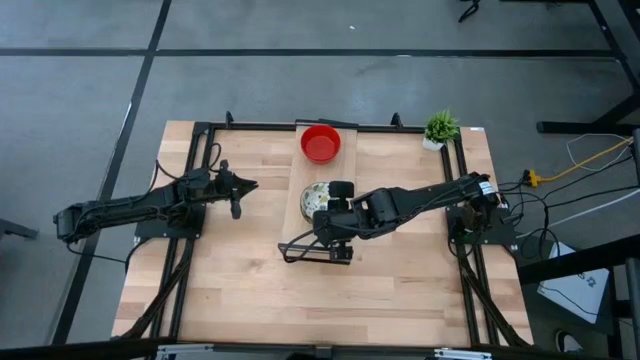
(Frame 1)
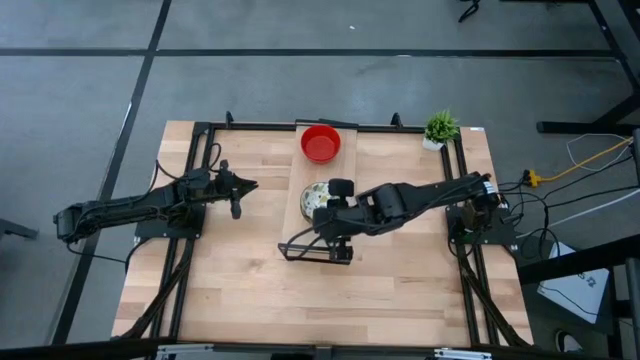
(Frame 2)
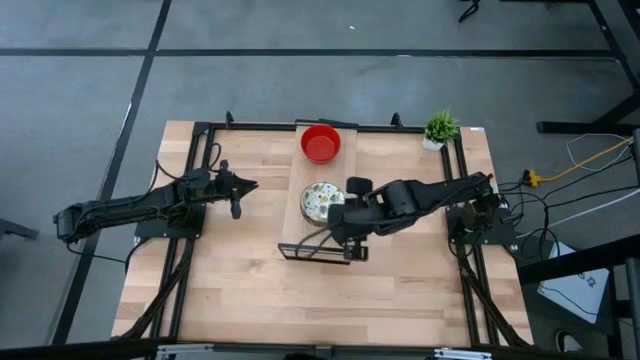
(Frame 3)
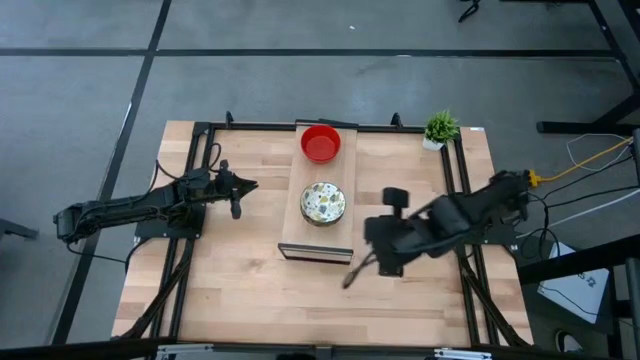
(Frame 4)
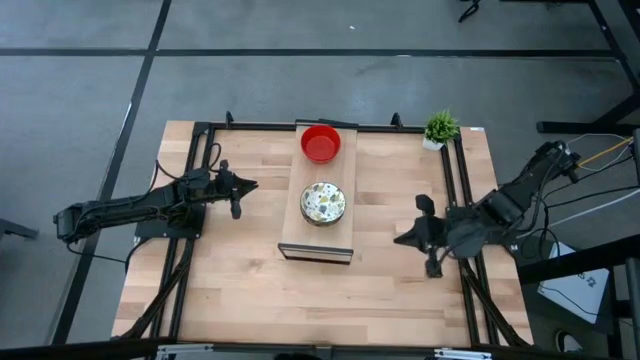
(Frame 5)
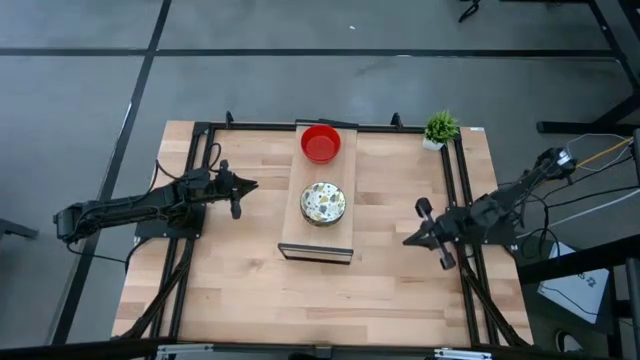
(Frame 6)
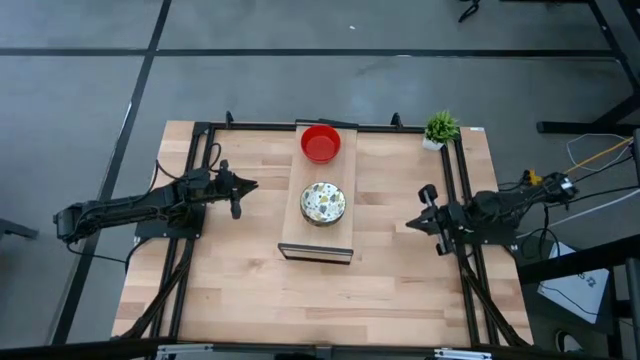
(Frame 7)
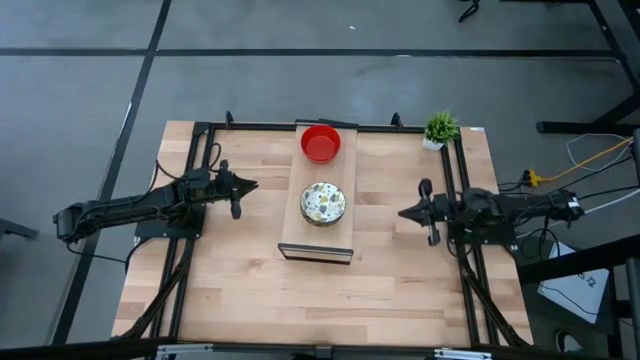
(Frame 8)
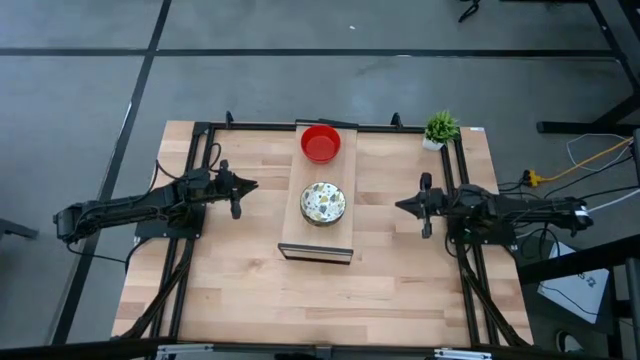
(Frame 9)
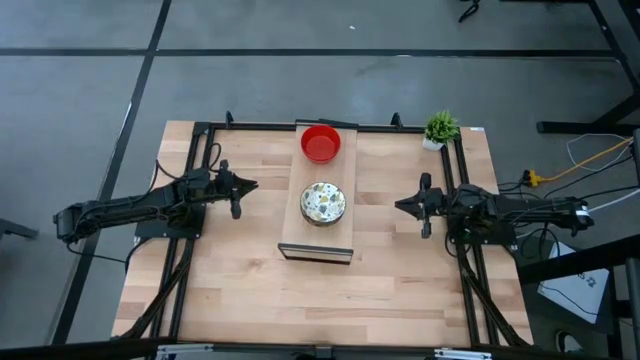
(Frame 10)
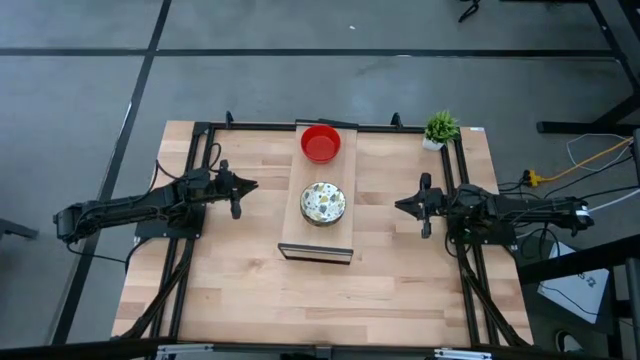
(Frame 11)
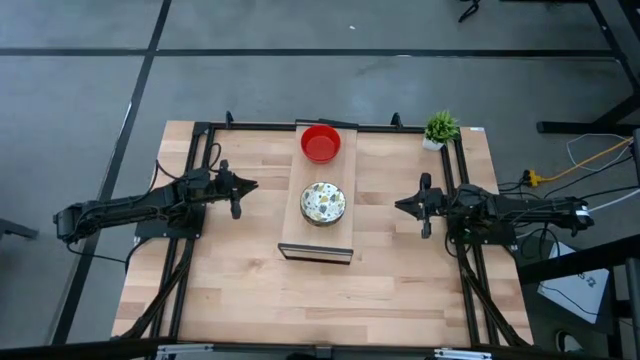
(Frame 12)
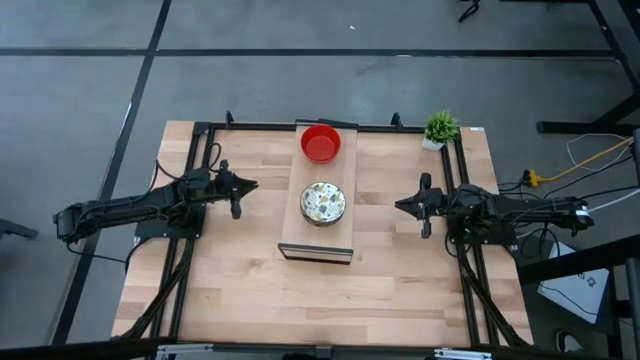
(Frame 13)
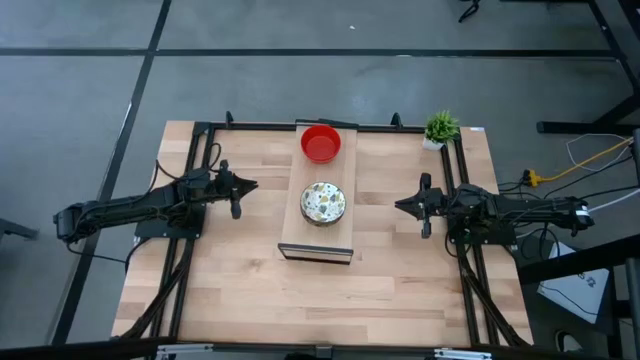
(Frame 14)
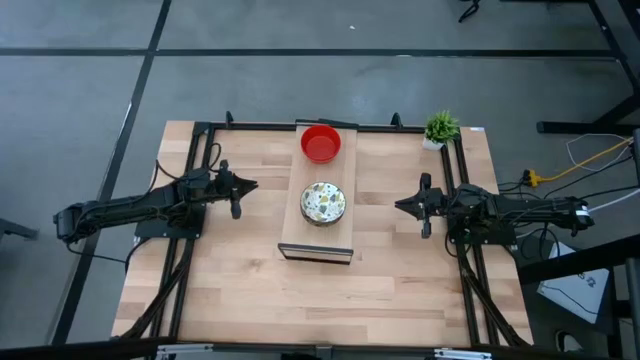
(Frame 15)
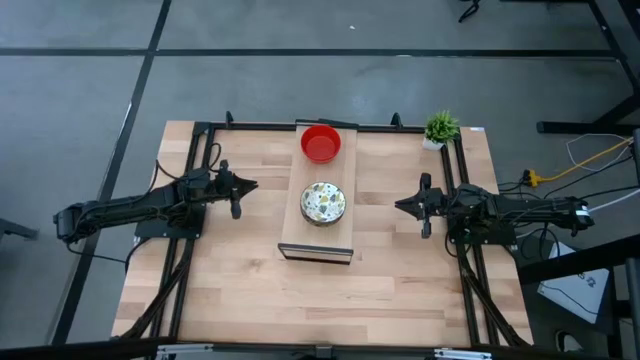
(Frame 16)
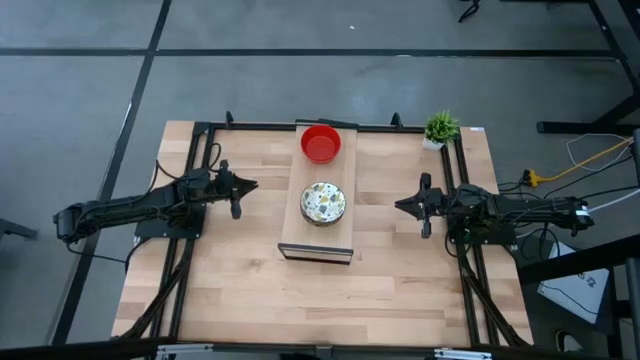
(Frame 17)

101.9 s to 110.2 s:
Task: Pick & Place Mini bowls
Return to Home Position

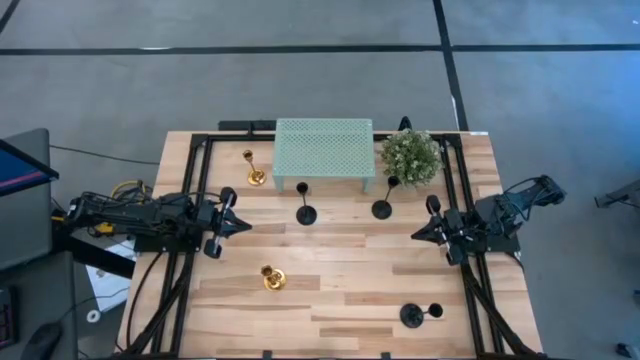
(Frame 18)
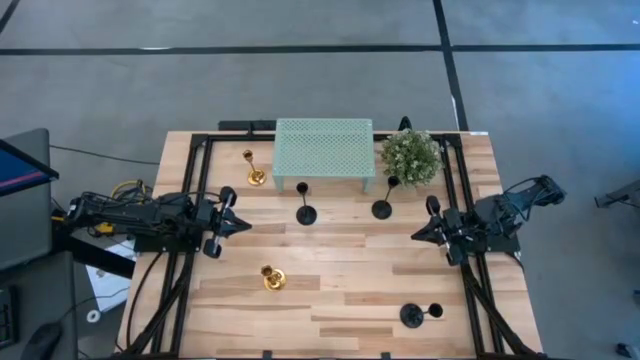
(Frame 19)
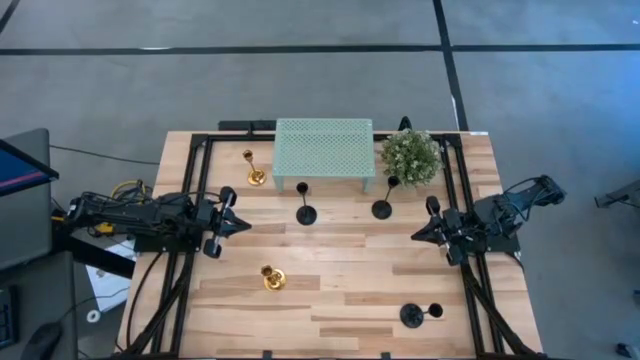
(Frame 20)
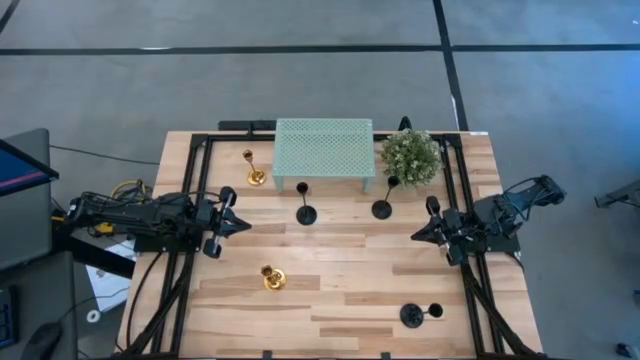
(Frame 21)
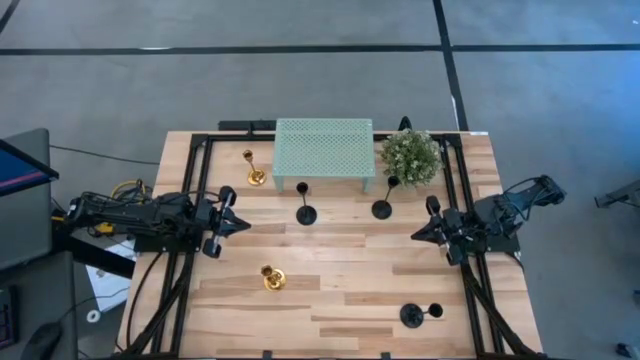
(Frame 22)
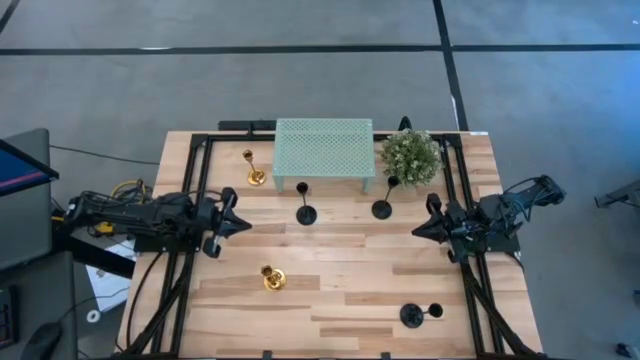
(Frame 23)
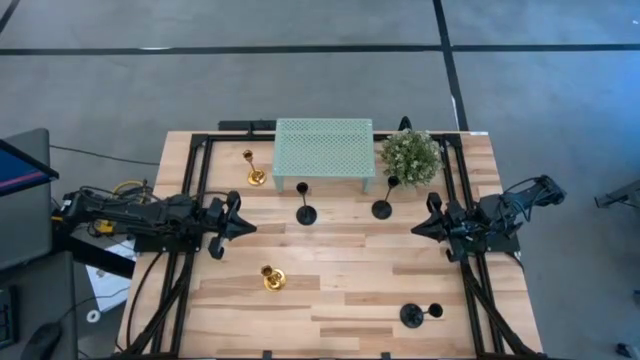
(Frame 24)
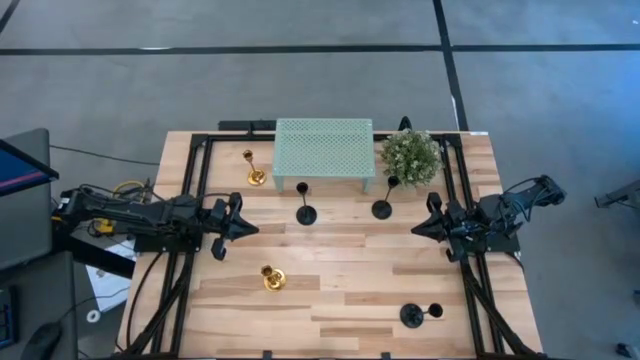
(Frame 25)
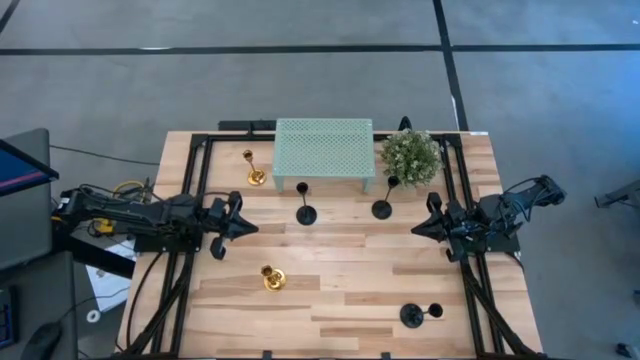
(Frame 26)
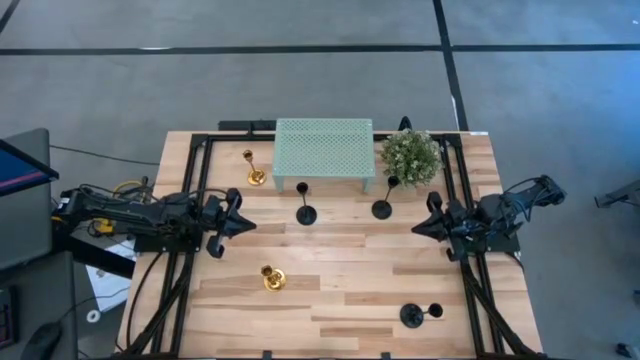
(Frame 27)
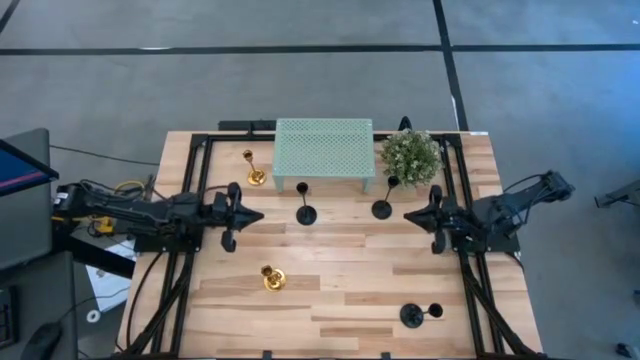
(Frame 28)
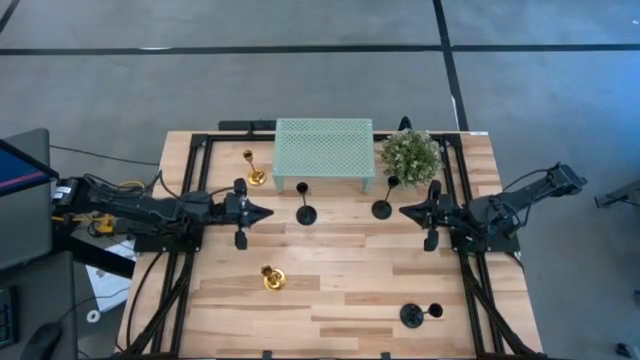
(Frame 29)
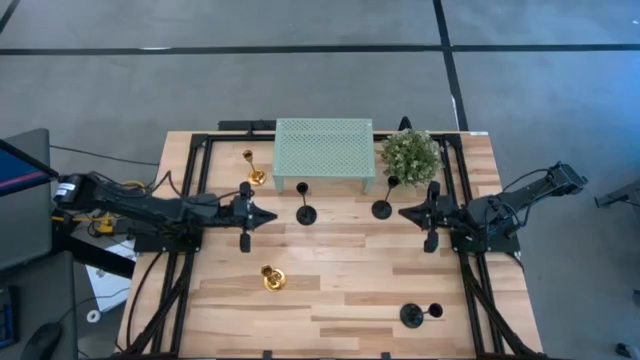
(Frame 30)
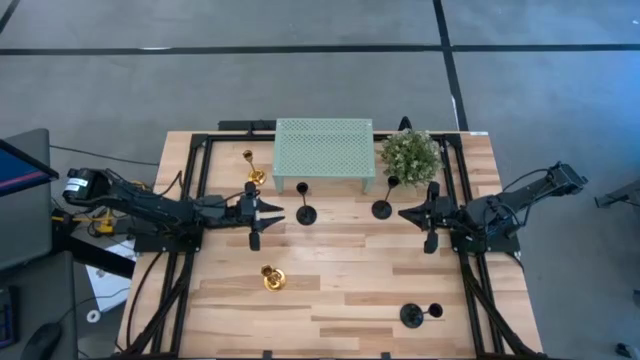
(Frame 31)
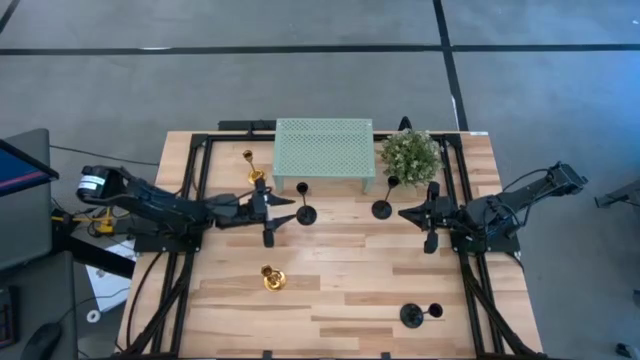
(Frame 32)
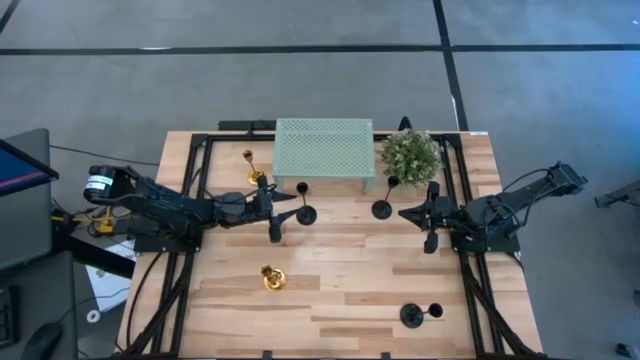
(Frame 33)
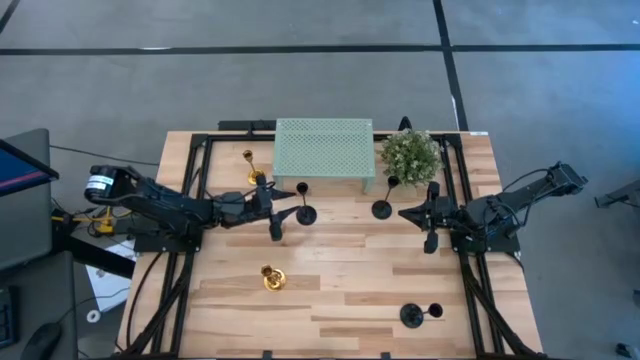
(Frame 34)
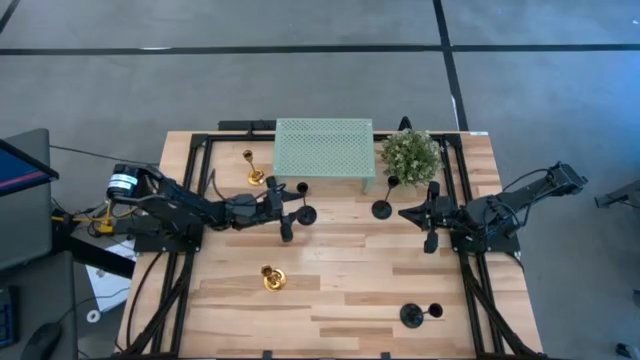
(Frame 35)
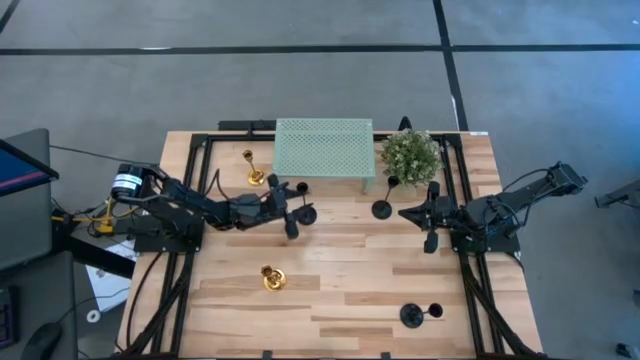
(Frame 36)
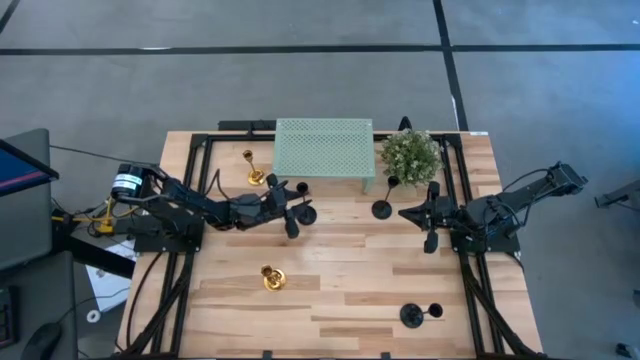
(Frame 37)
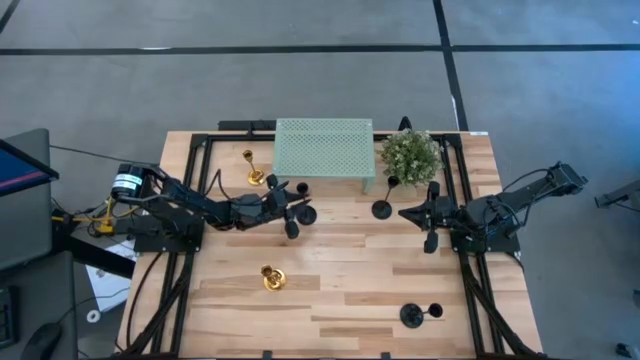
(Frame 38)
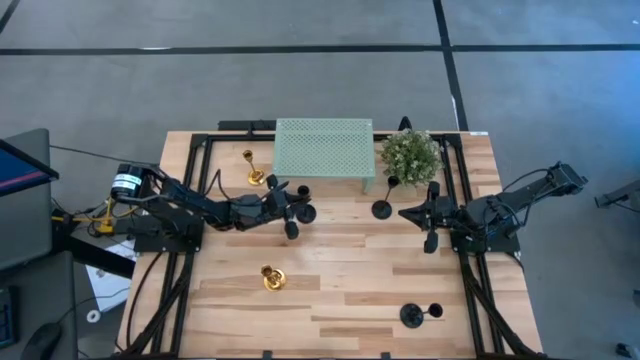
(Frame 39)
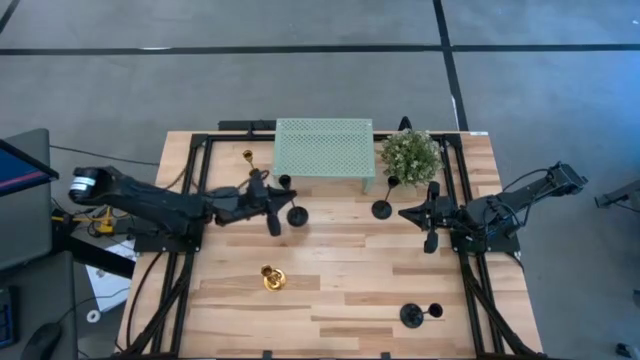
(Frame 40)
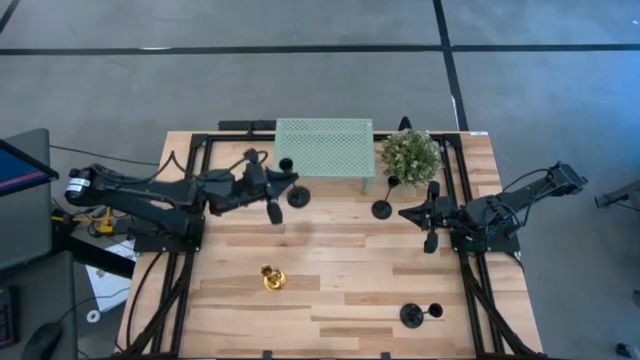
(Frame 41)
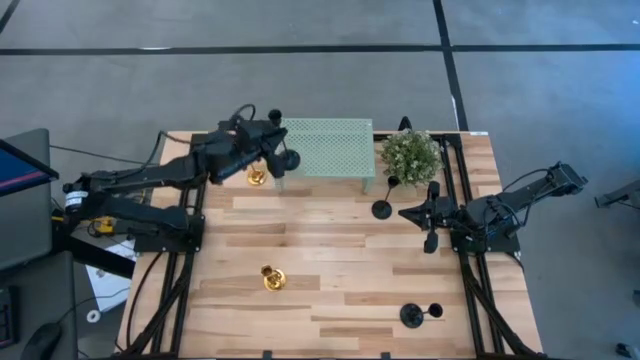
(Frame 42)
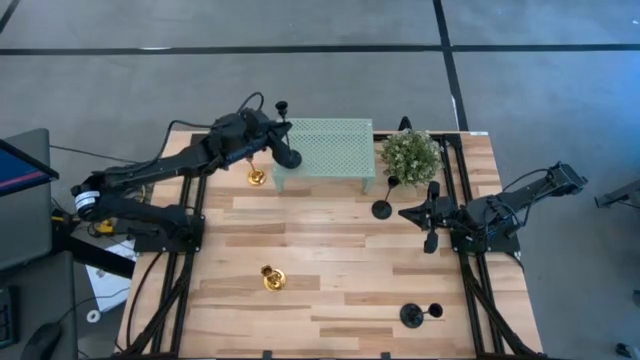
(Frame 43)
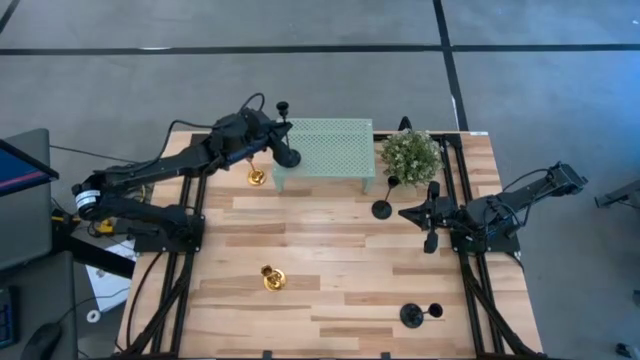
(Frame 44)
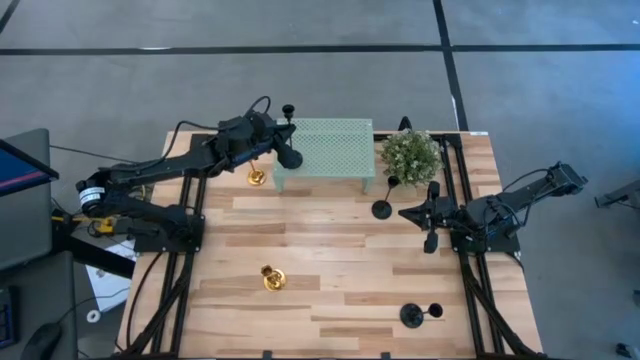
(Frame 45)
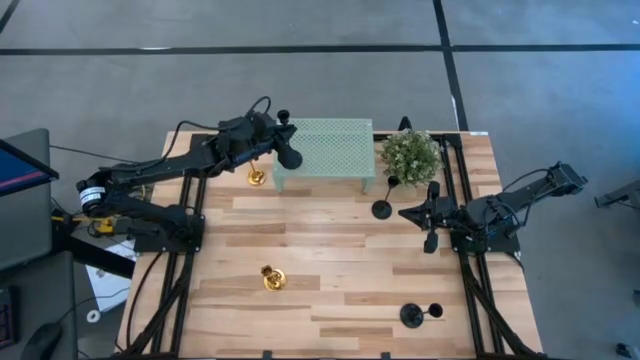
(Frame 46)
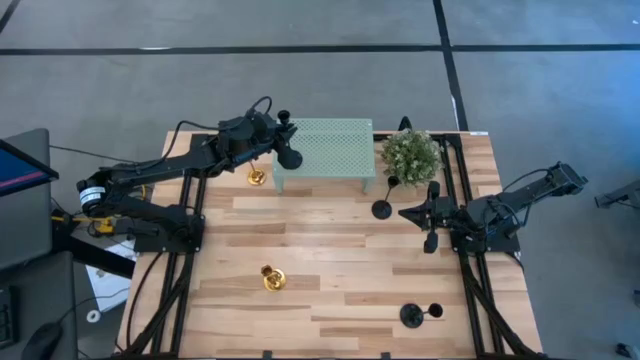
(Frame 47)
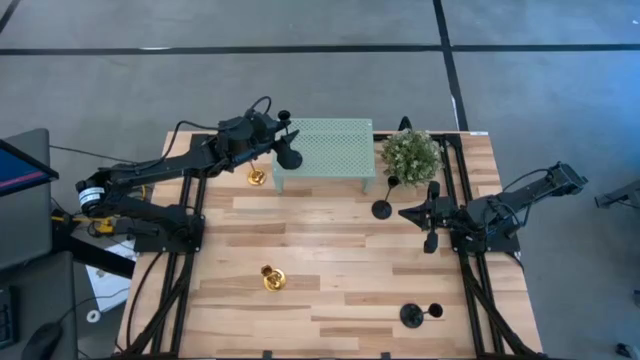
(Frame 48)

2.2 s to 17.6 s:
Task: Pick & Place candle stick holders
Put the top left black candle holder on the shelf
